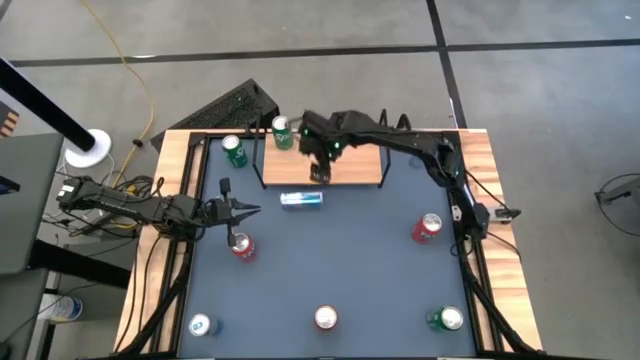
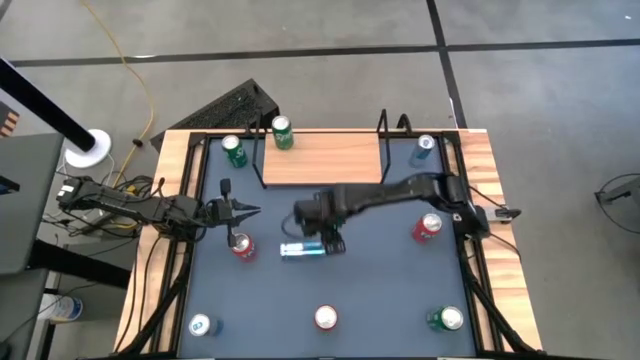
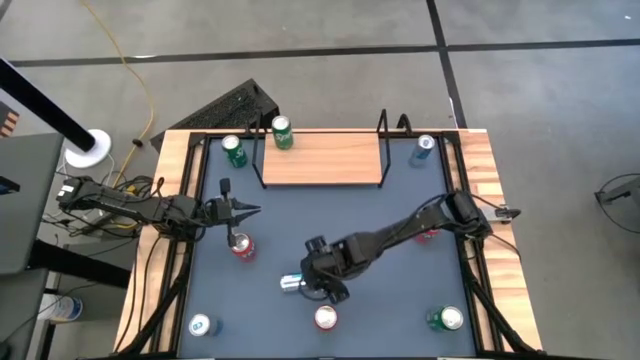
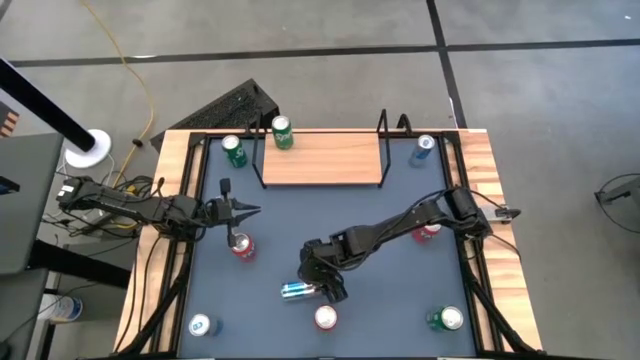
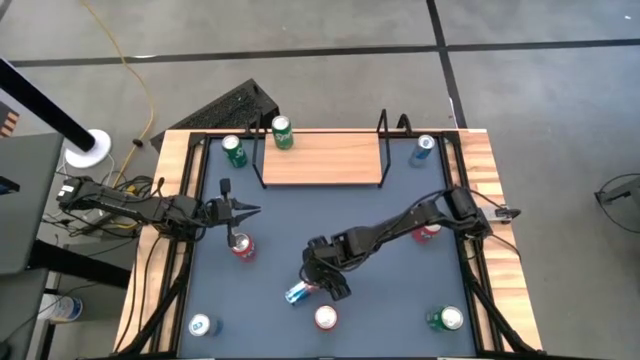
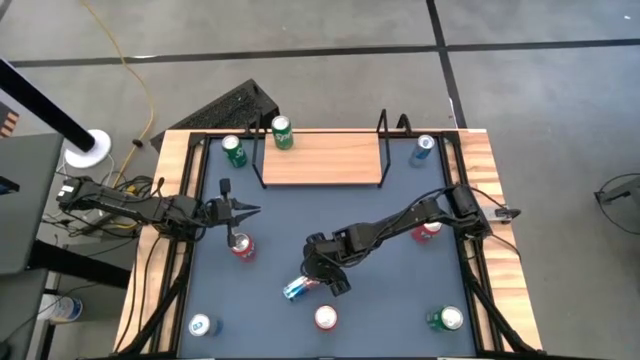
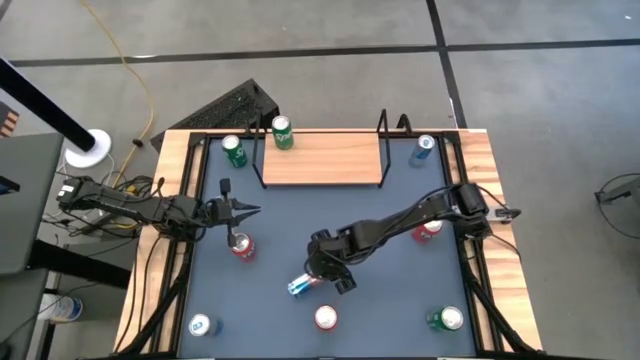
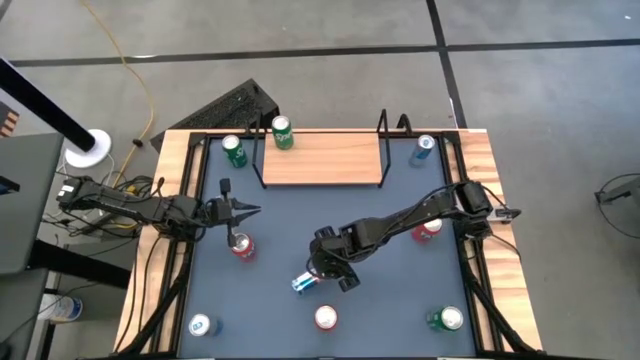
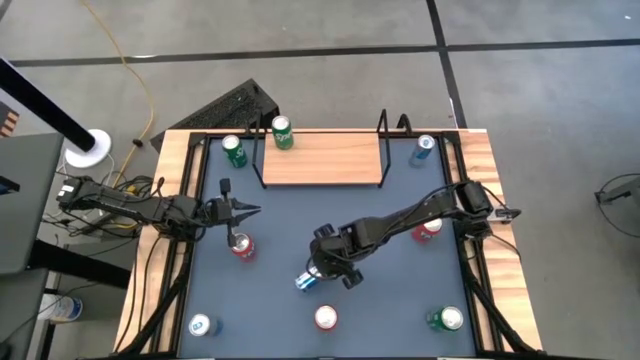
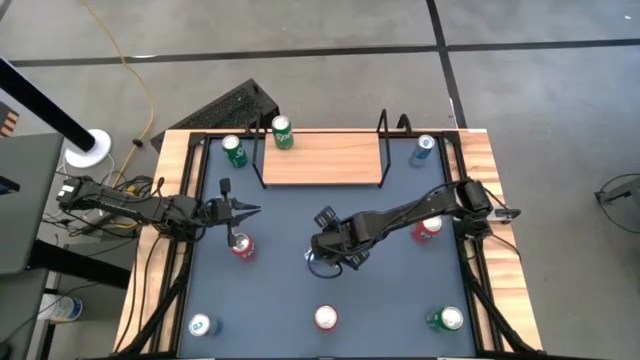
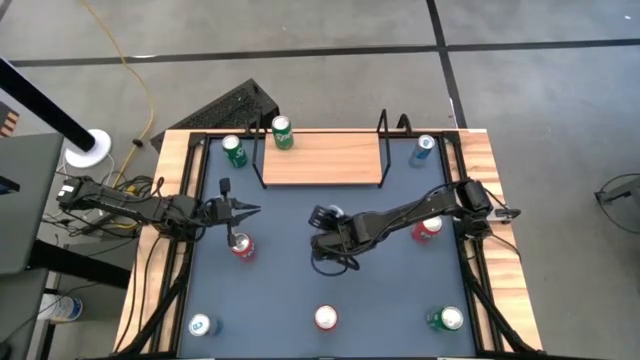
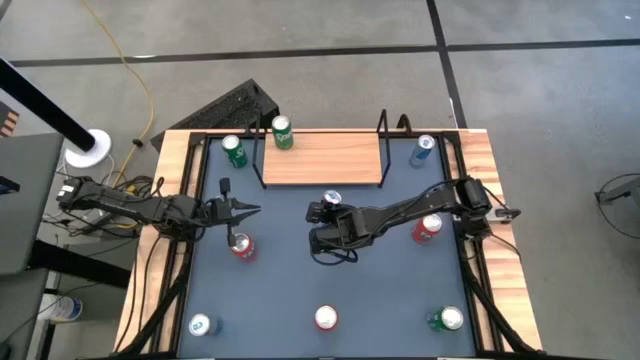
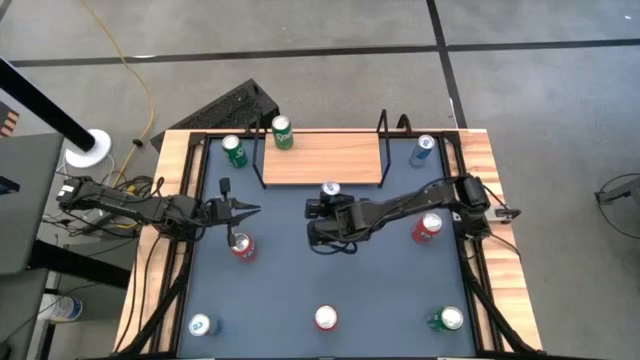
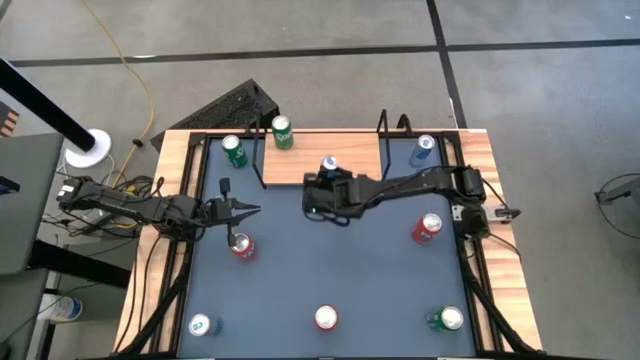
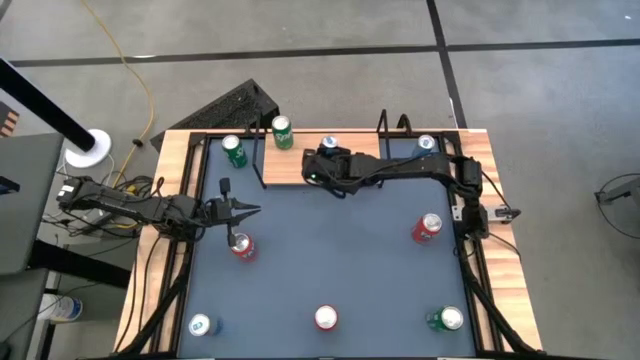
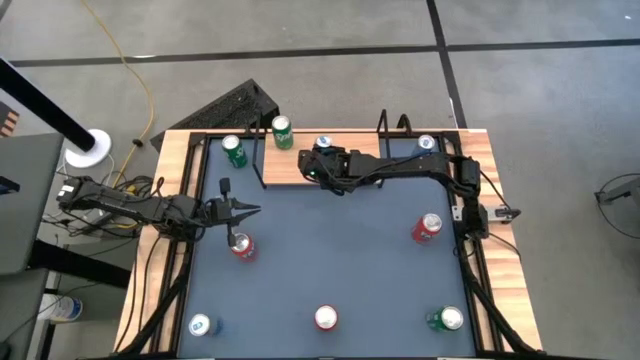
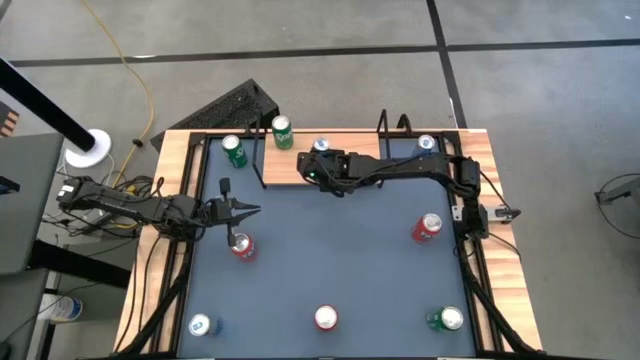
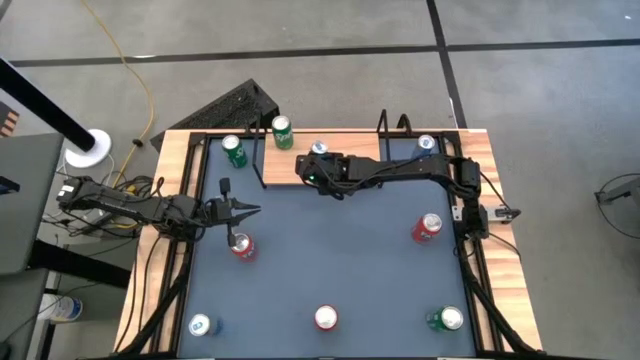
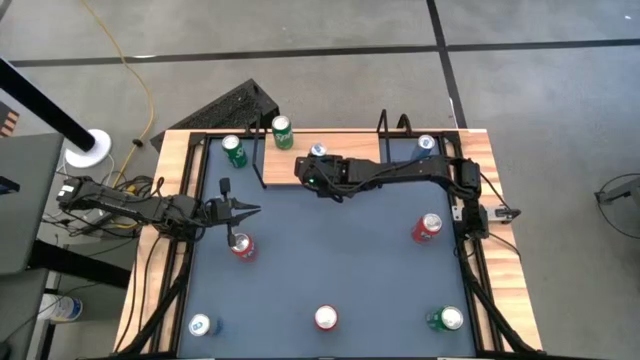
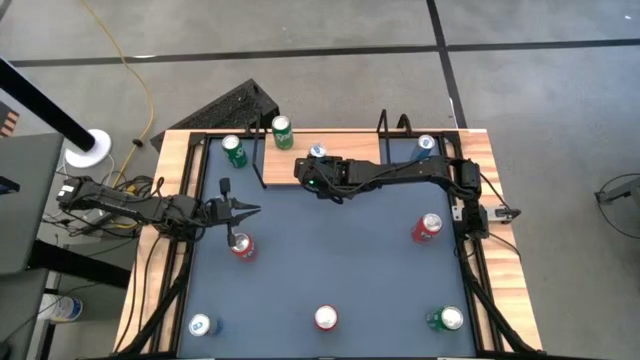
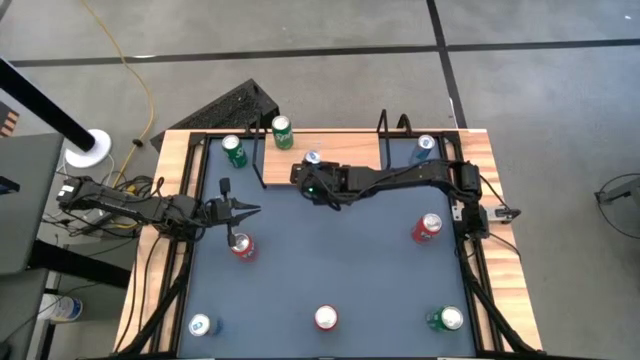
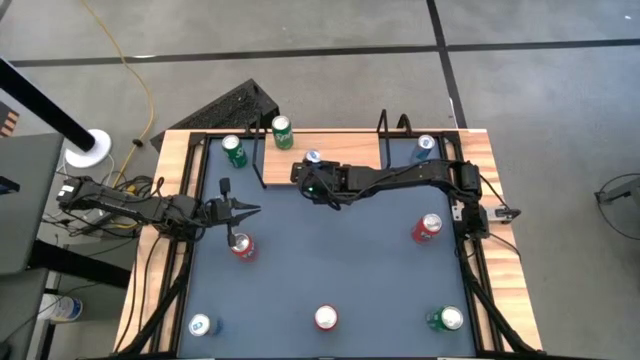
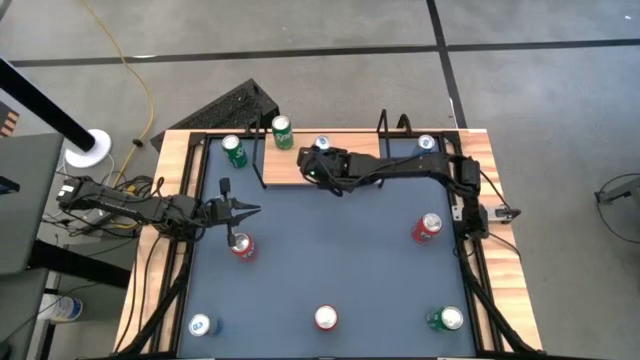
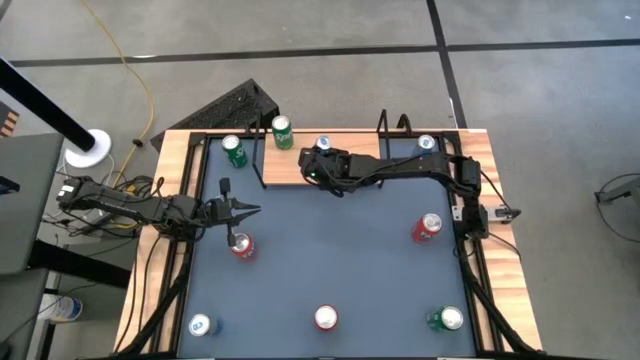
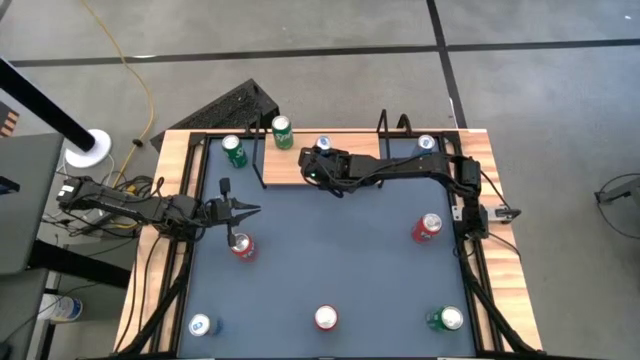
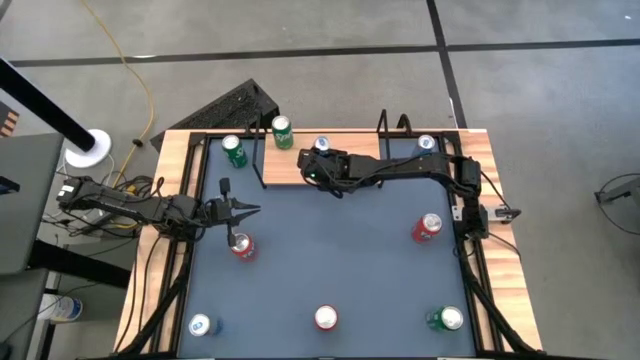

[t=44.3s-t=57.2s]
Task: Place canned beverage on shelf
Put the middle blue soda can on the shelf

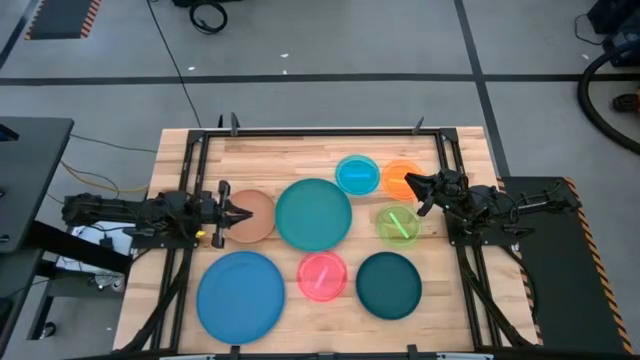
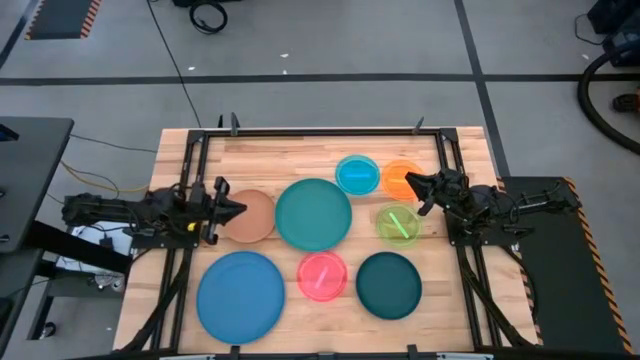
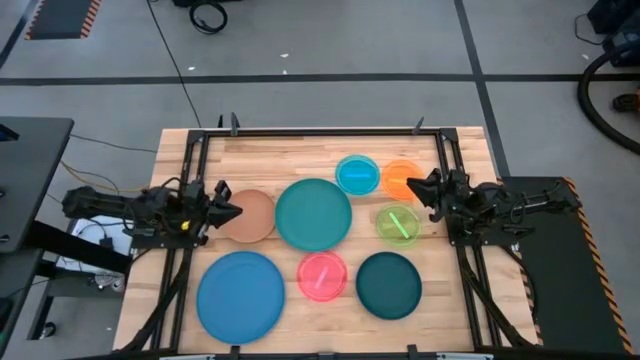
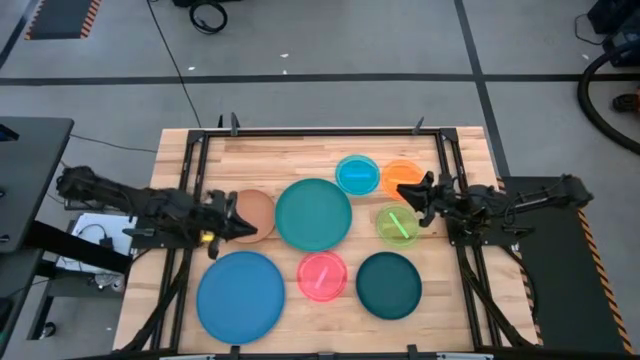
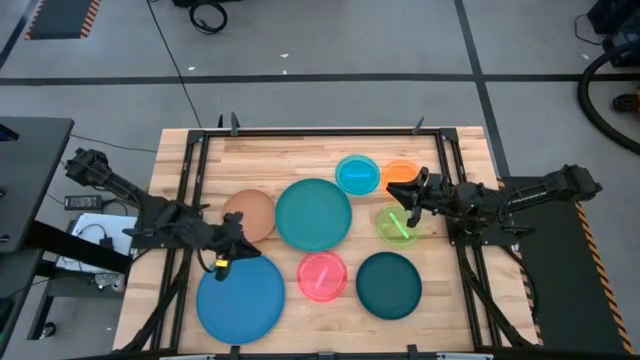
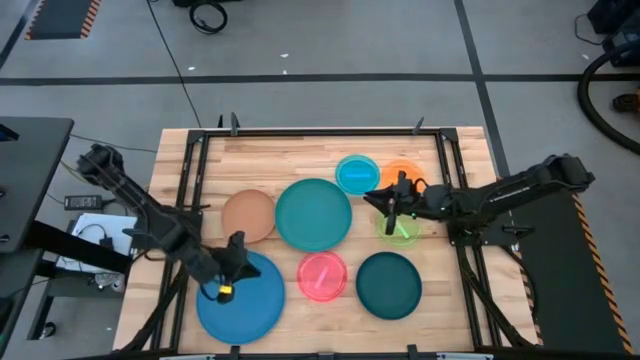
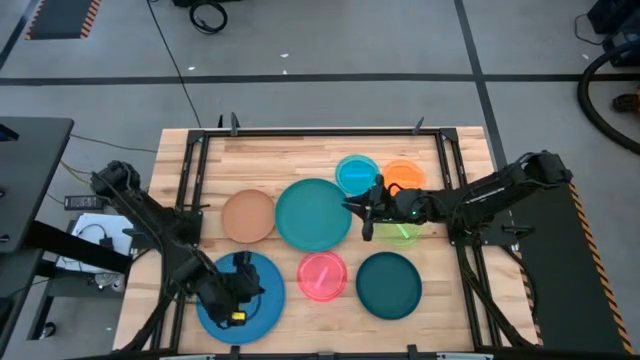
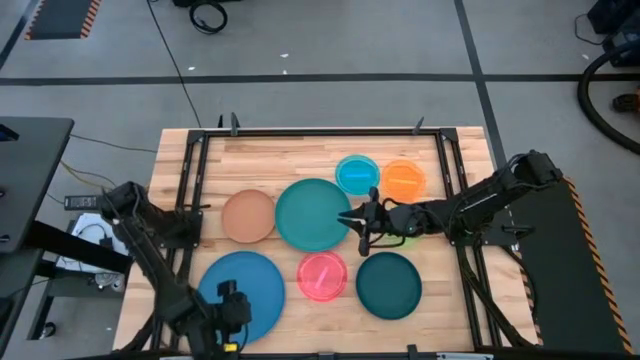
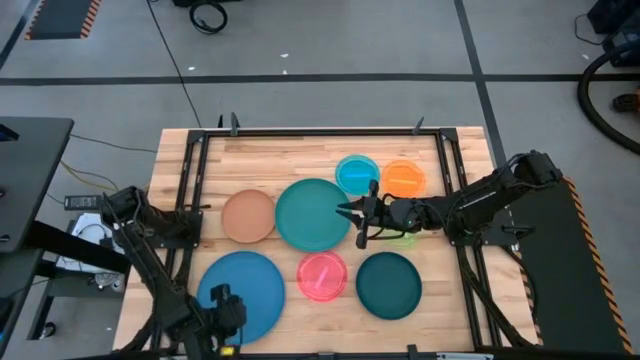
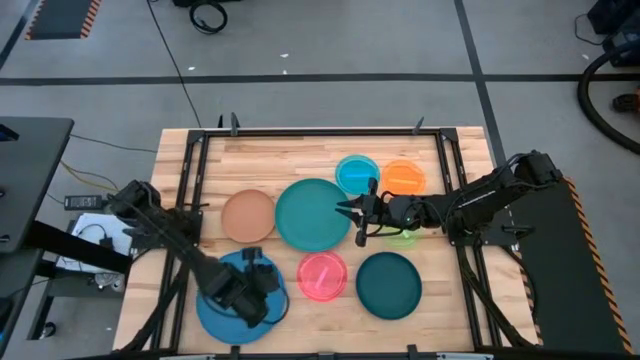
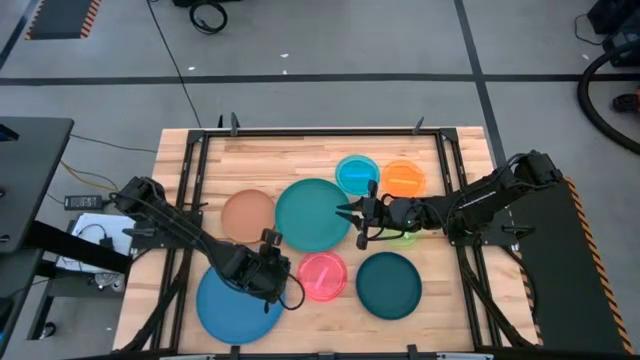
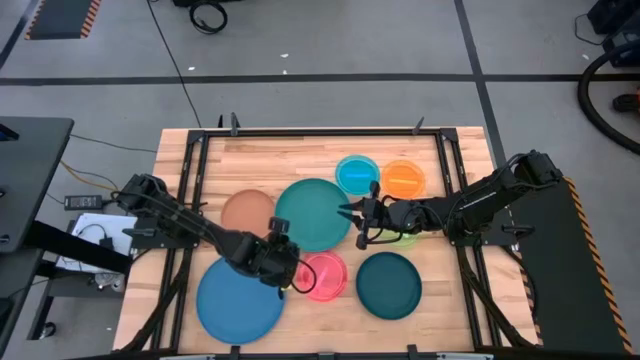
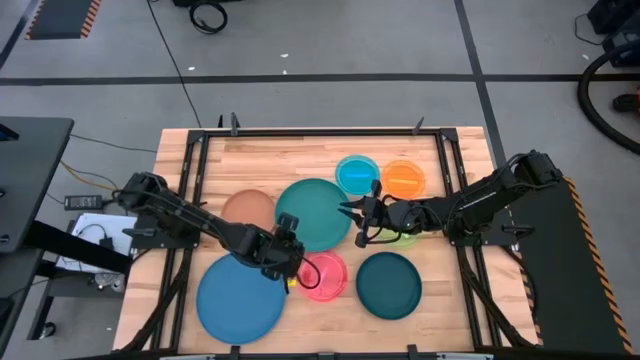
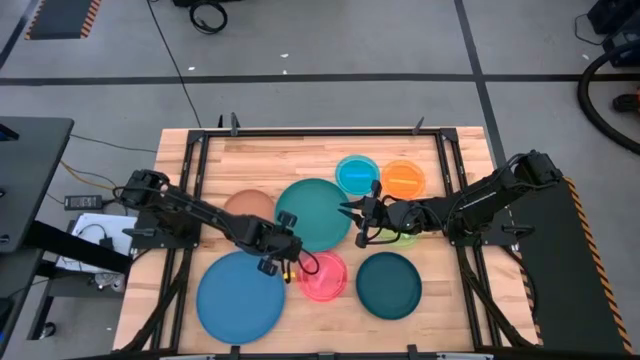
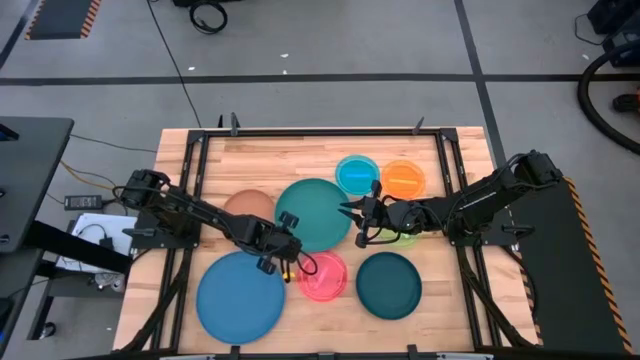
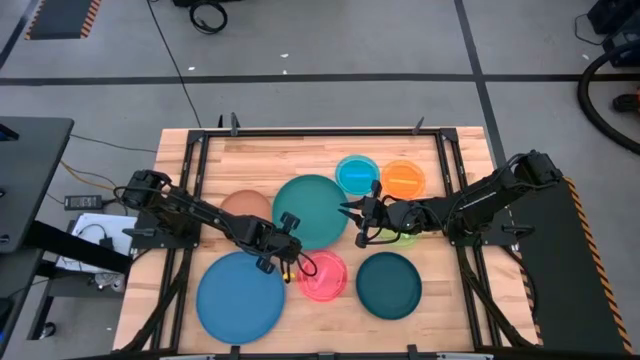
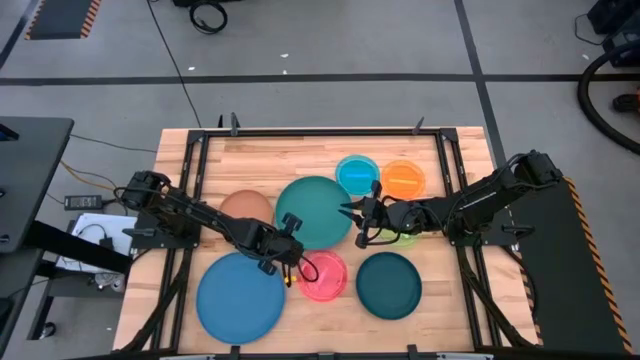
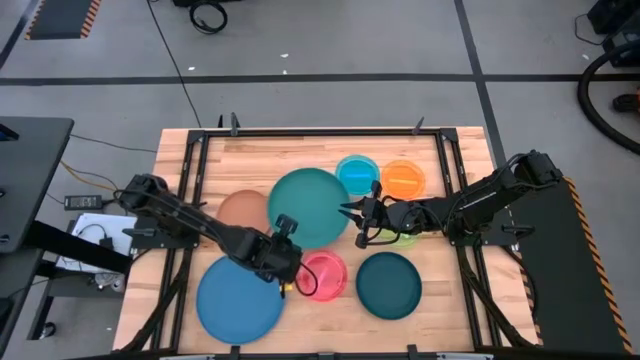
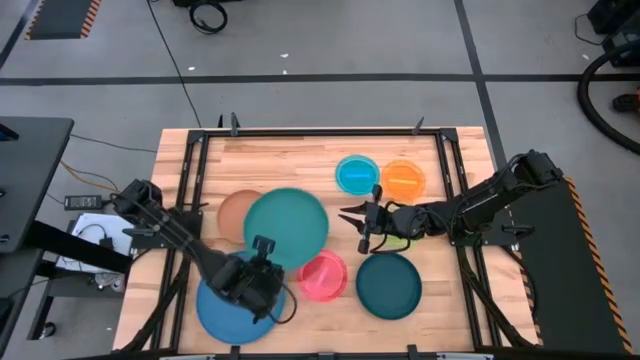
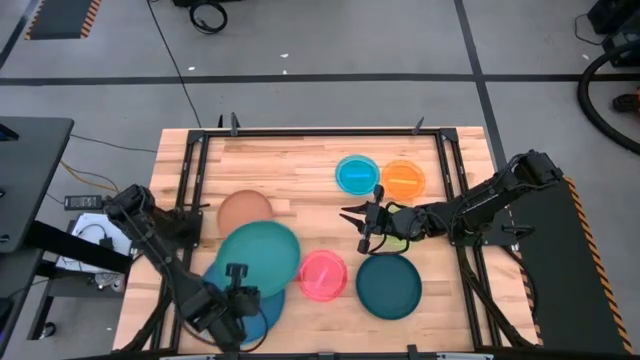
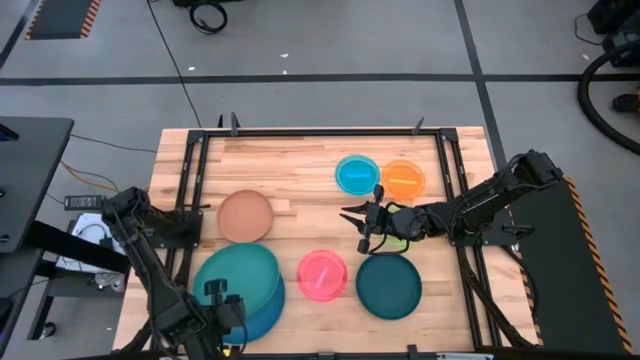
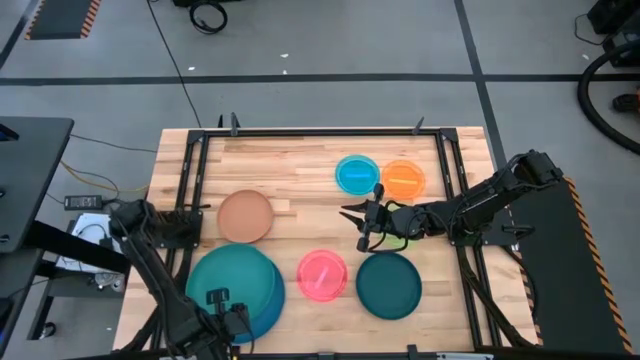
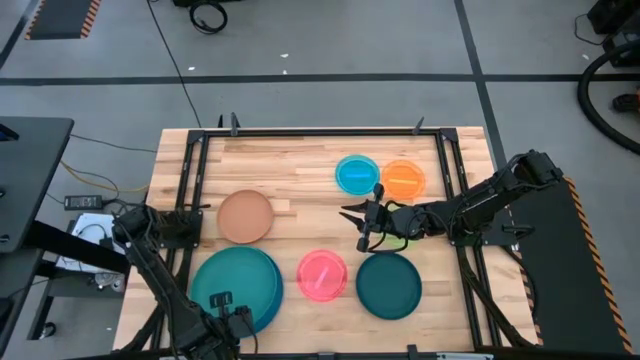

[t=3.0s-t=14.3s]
Task: Stack plastic plates
Stack the green plate on top of the blue plate
